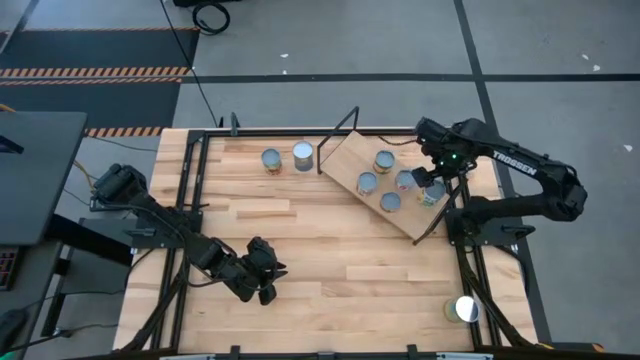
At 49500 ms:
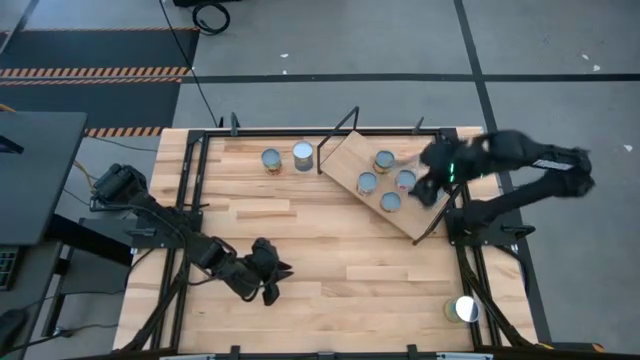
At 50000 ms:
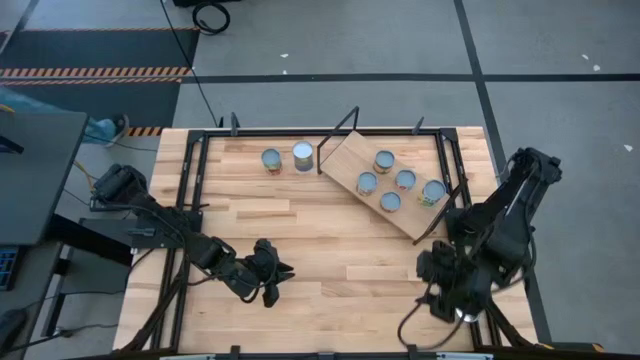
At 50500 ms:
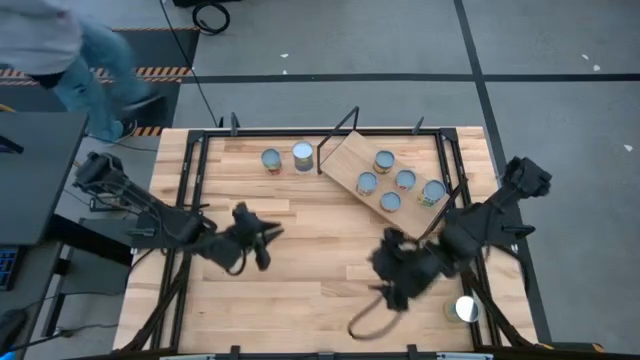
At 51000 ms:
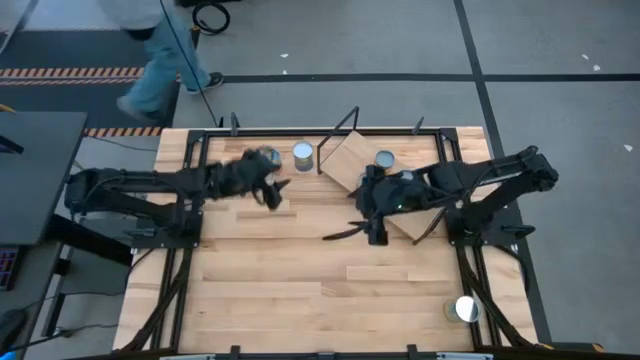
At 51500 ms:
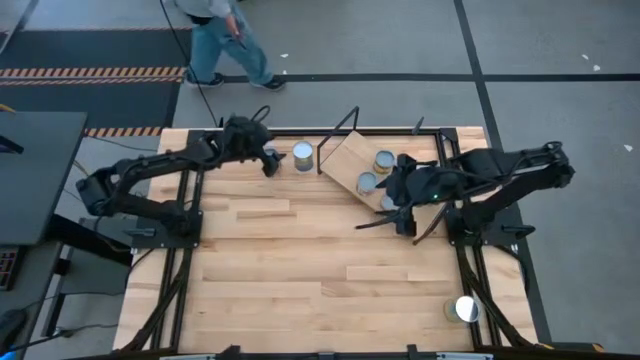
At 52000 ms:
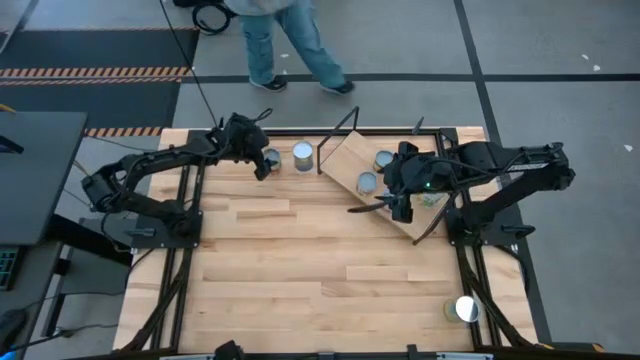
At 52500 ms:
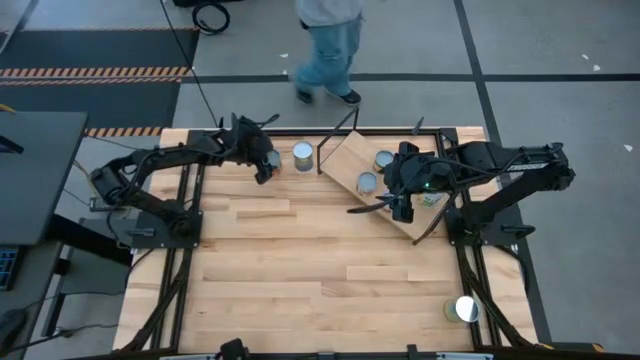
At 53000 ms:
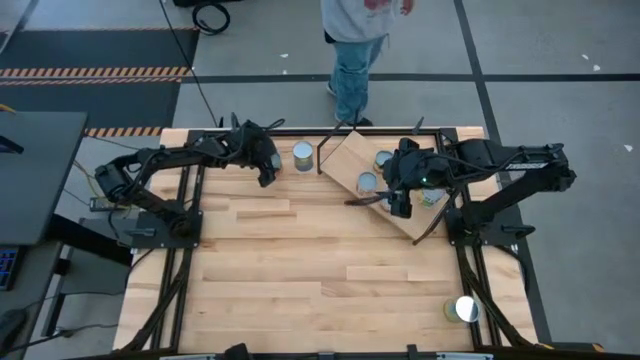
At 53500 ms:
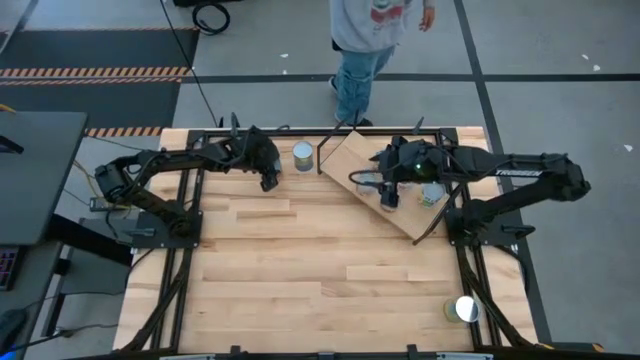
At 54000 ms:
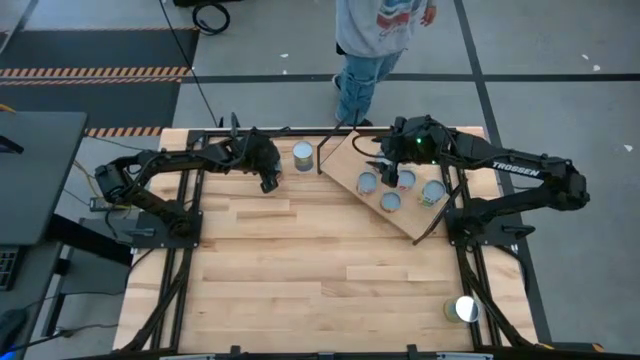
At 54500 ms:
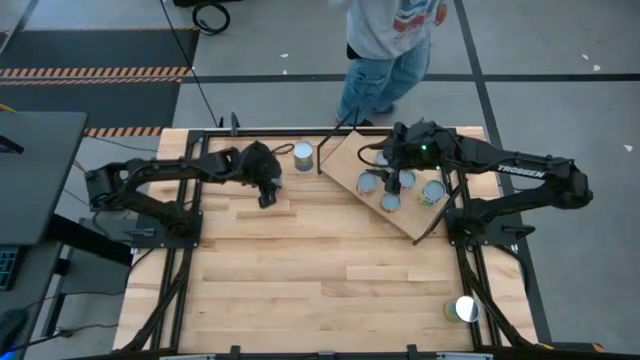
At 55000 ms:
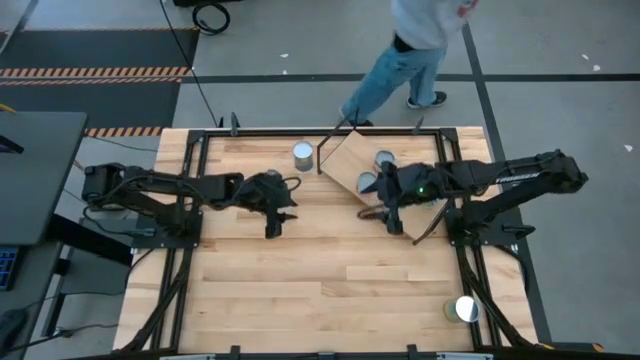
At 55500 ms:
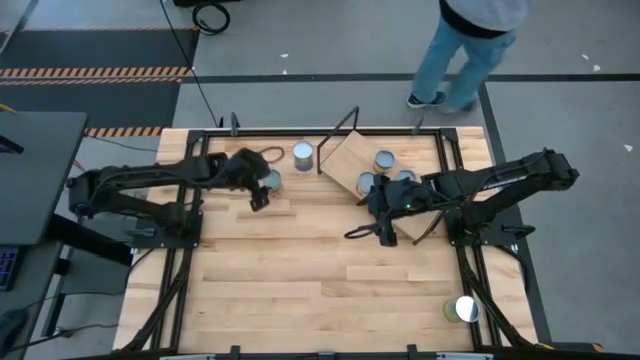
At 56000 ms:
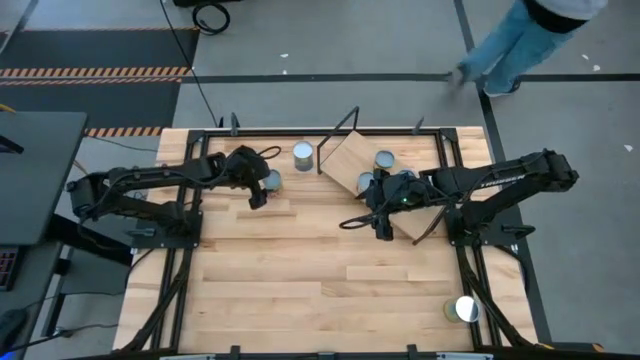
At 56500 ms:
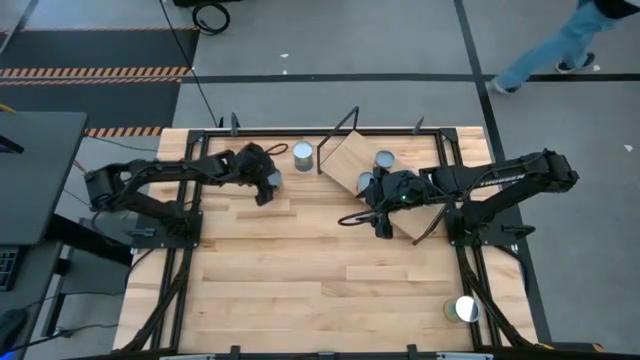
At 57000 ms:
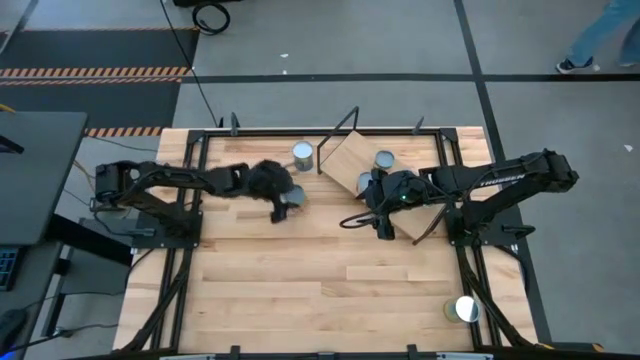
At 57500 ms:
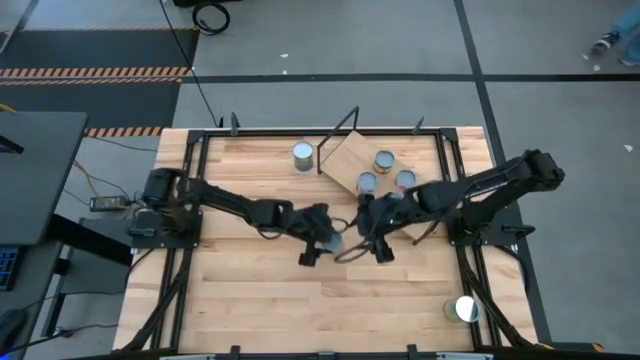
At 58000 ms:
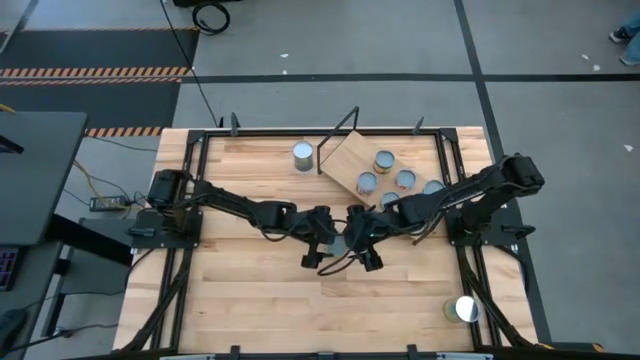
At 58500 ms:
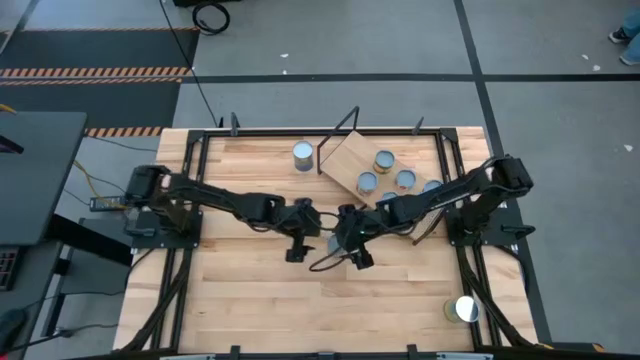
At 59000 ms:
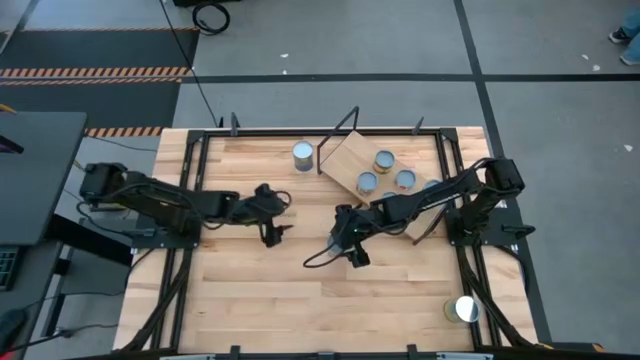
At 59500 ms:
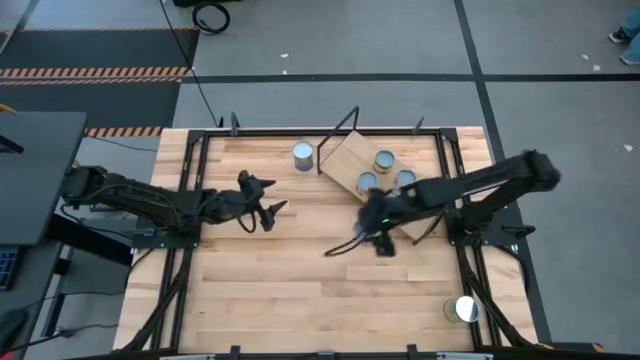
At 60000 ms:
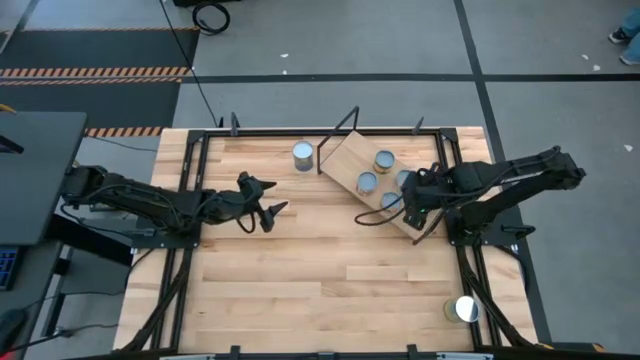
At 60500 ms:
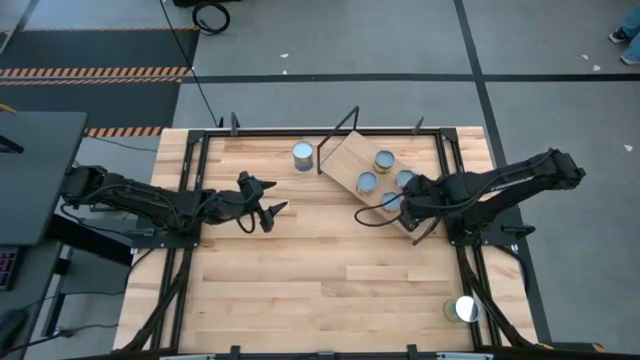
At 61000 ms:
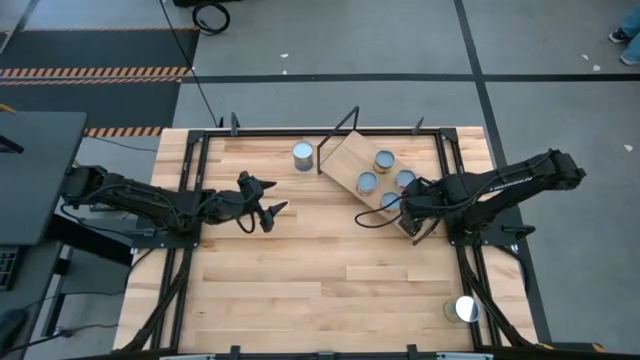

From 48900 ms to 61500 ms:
Task: Pick and place cans onto a shelf
Put the canned chili on the shelf aligned with the canned mixes fruits

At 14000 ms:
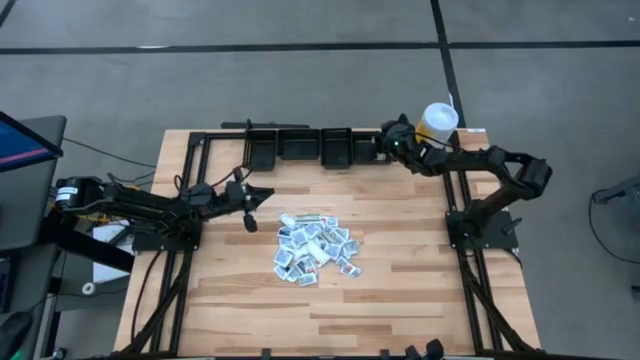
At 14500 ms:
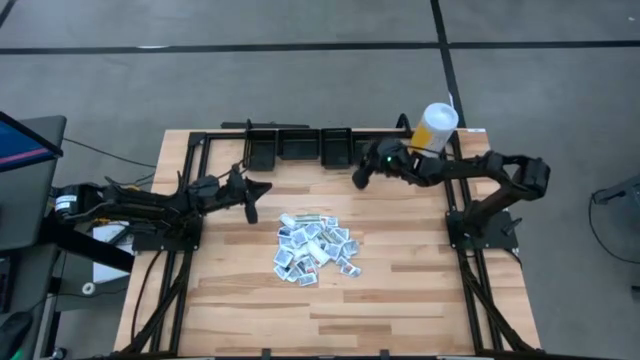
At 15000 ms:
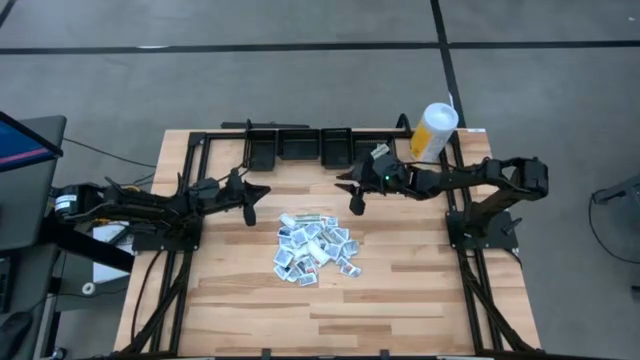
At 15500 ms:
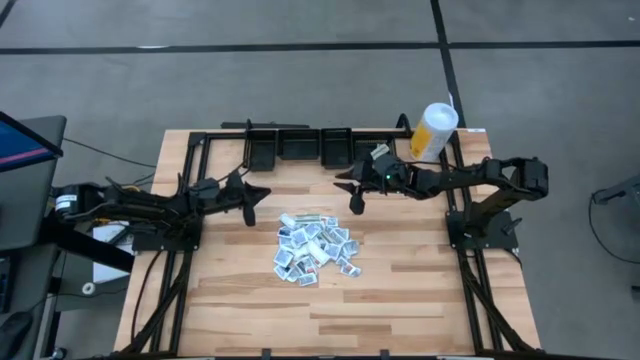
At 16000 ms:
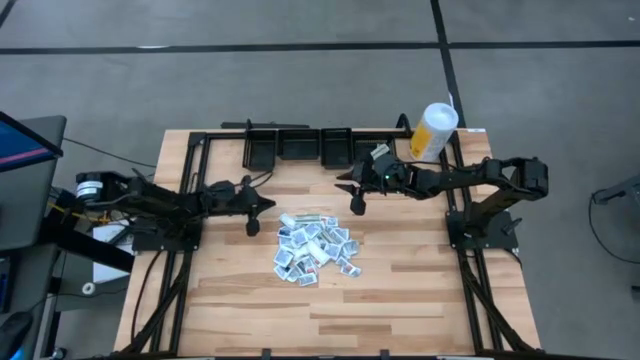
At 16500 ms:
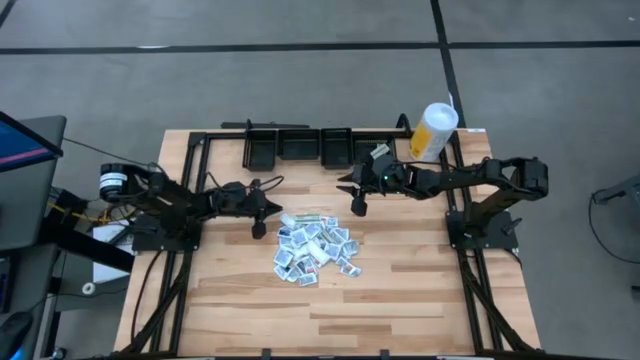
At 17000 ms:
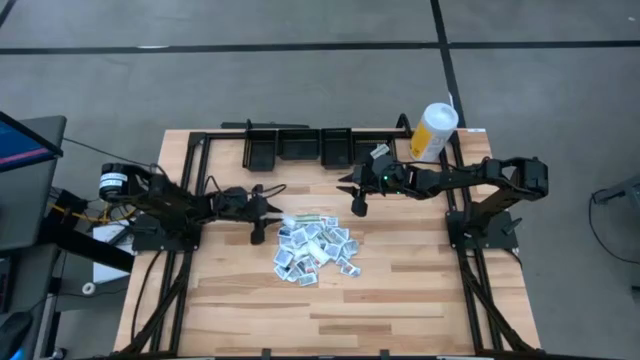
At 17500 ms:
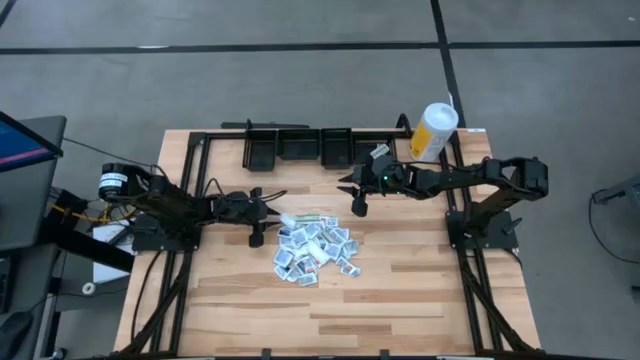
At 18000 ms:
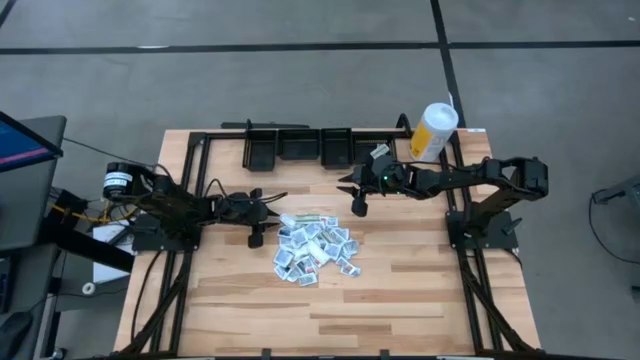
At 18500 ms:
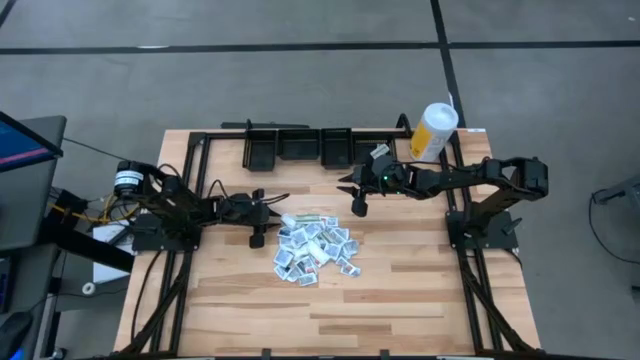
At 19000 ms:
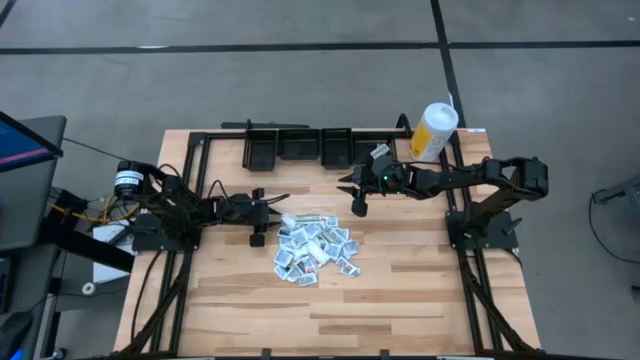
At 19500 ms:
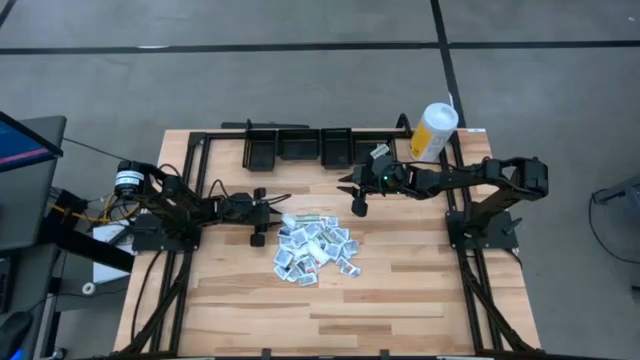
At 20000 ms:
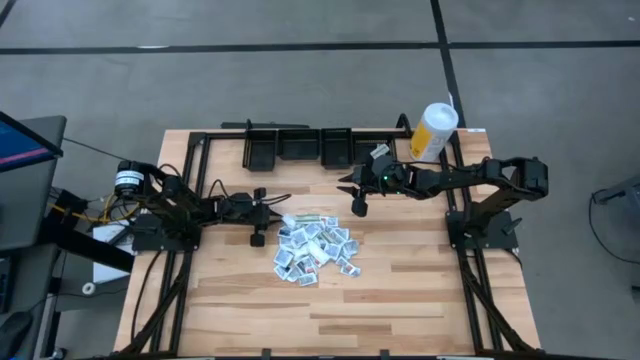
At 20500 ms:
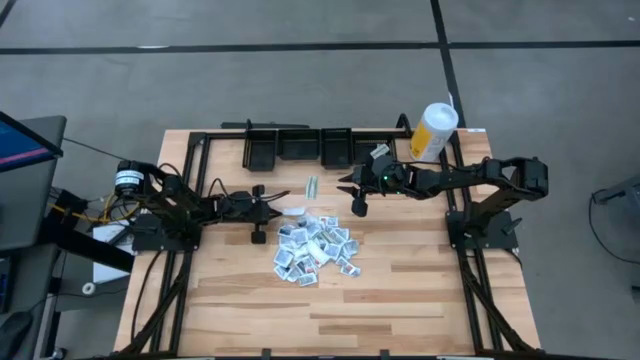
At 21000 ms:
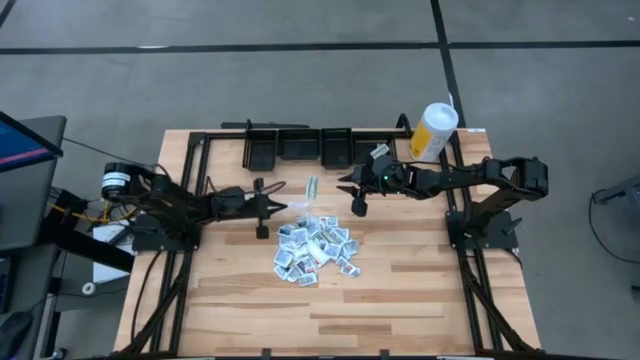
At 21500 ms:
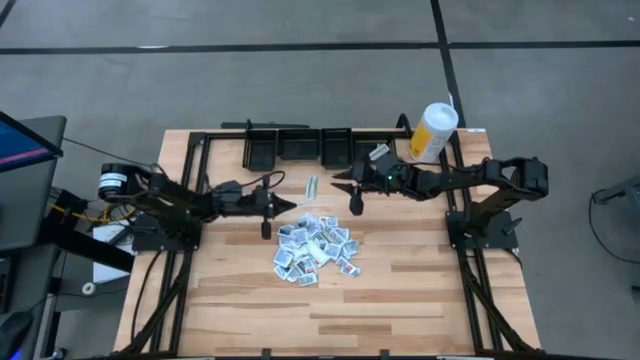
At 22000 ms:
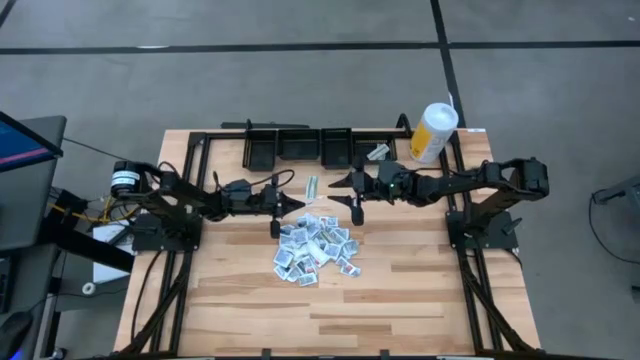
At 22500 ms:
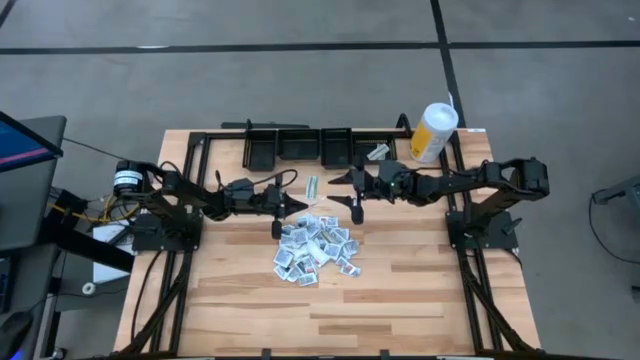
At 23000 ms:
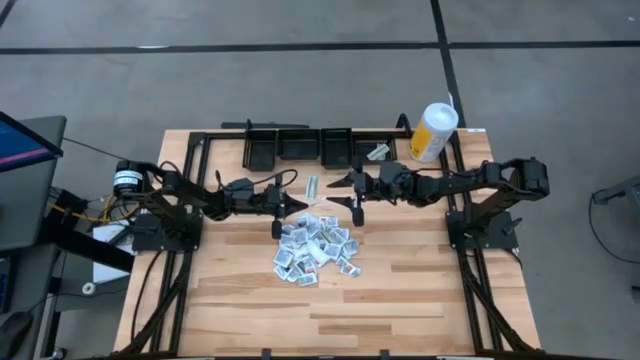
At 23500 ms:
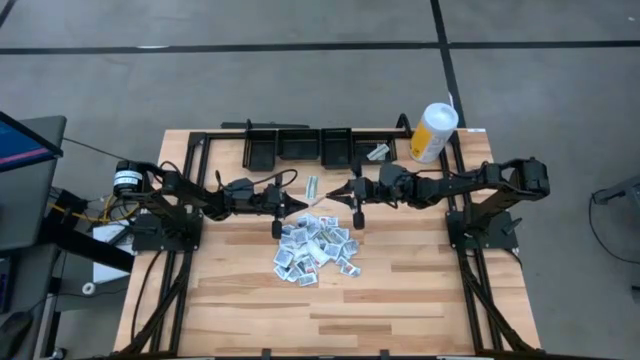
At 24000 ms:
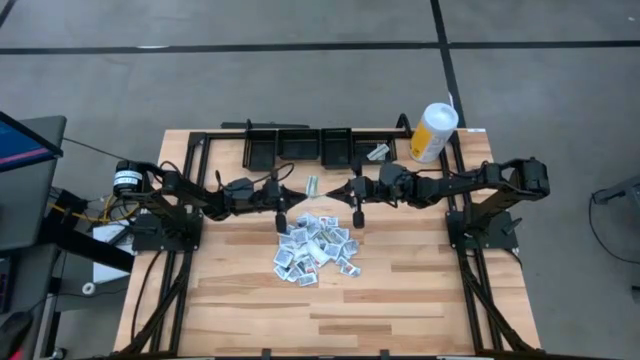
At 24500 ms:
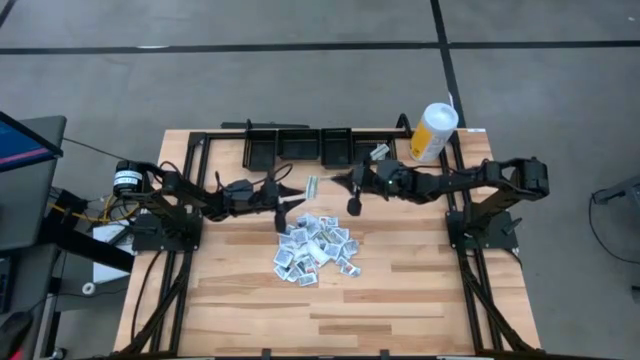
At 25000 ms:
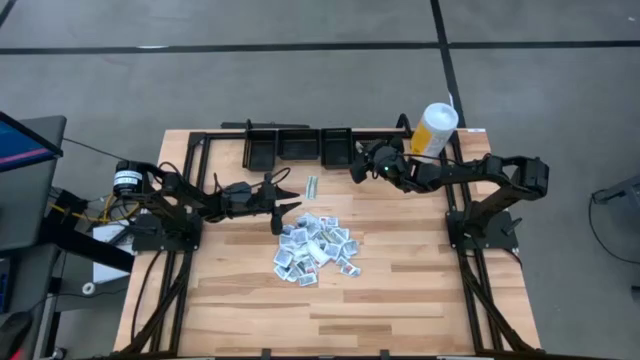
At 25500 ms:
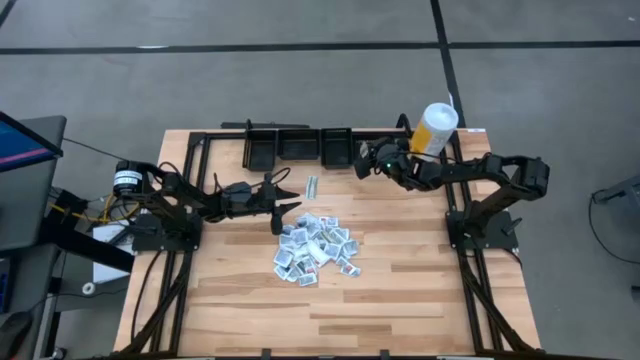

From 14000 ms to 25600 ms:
Task: Pick & Place First Aid Supplies
Put the green bandage pack into the right black bin
